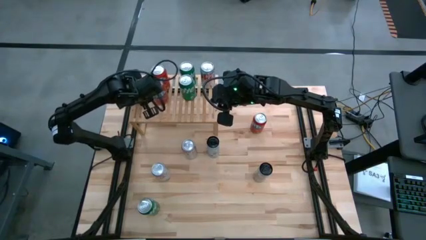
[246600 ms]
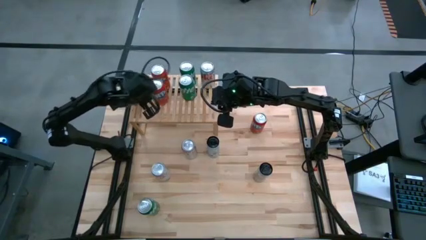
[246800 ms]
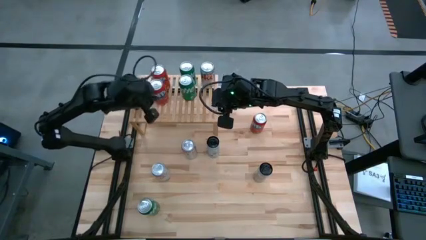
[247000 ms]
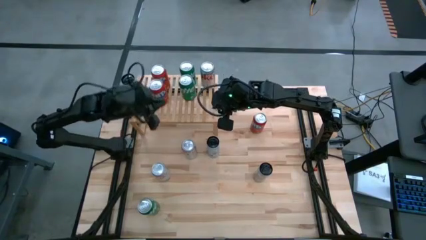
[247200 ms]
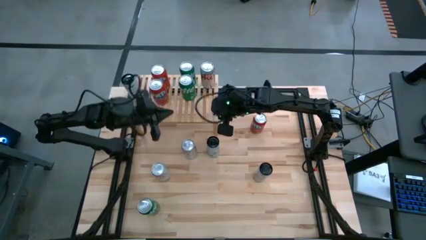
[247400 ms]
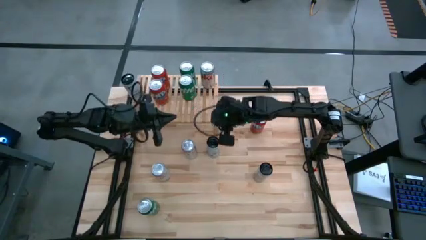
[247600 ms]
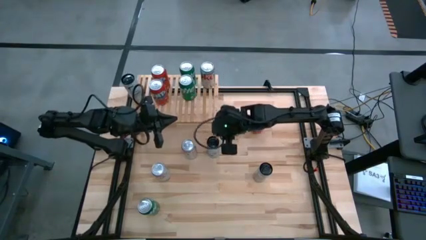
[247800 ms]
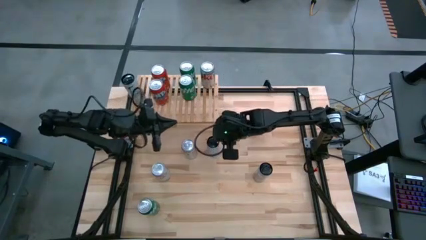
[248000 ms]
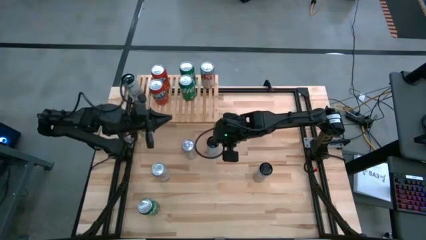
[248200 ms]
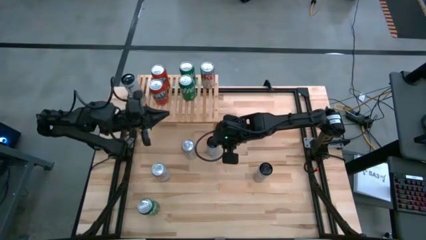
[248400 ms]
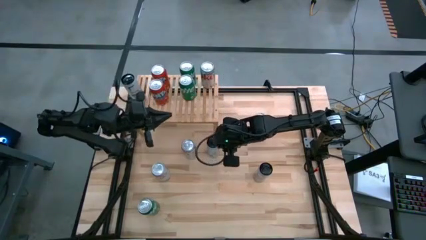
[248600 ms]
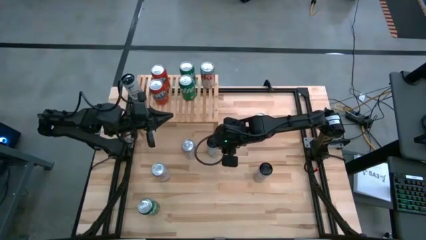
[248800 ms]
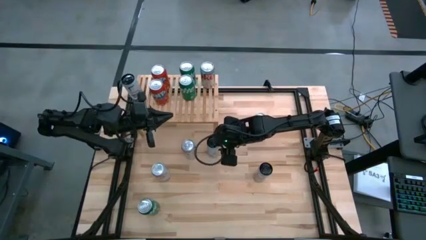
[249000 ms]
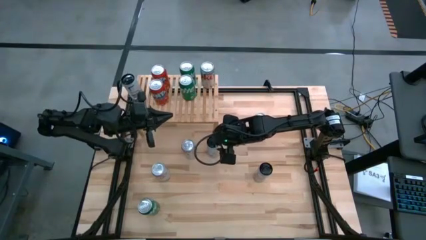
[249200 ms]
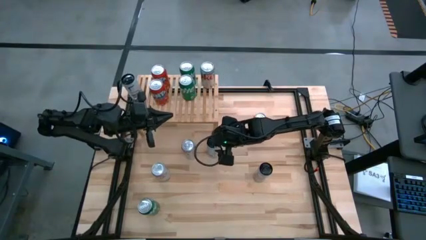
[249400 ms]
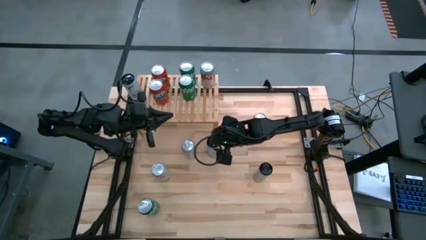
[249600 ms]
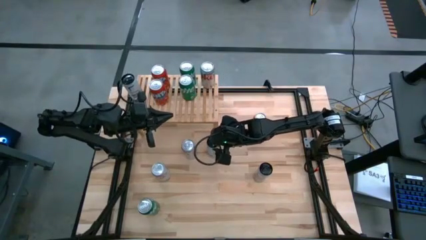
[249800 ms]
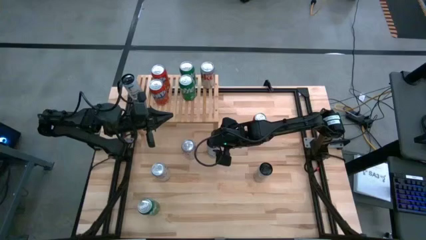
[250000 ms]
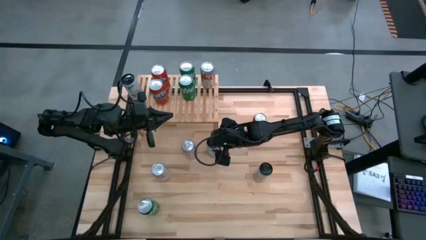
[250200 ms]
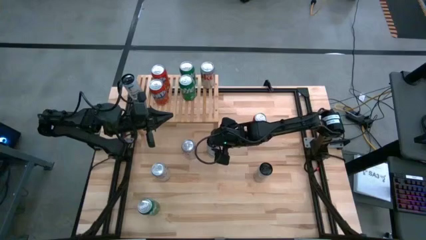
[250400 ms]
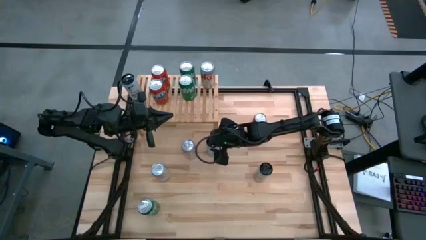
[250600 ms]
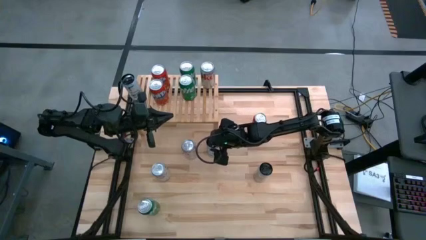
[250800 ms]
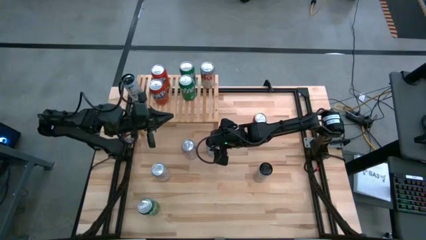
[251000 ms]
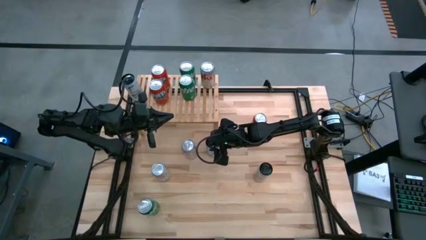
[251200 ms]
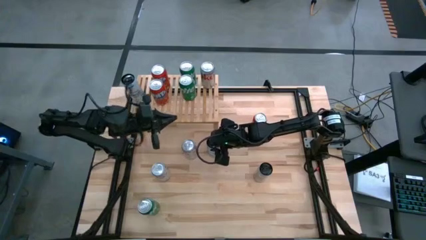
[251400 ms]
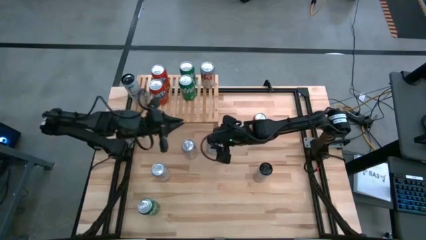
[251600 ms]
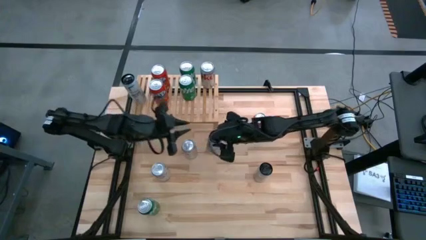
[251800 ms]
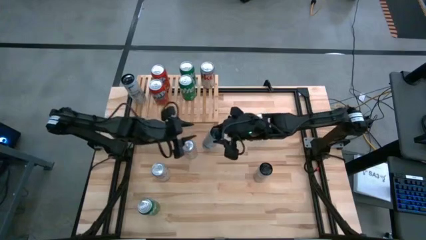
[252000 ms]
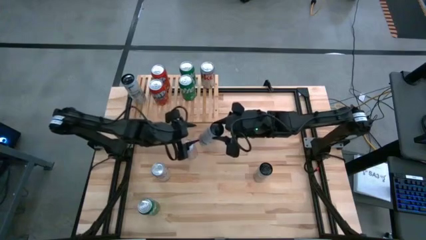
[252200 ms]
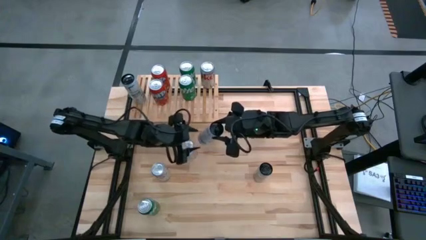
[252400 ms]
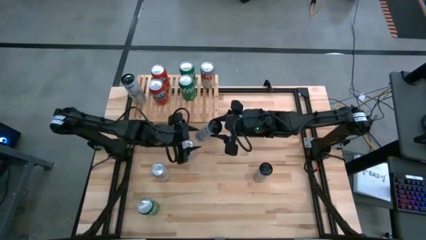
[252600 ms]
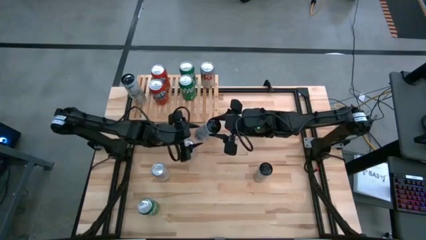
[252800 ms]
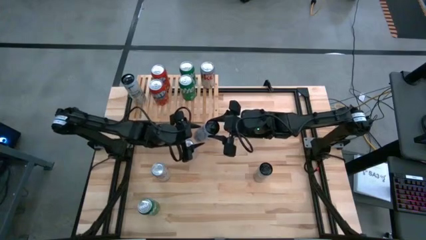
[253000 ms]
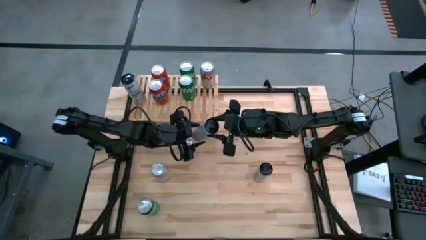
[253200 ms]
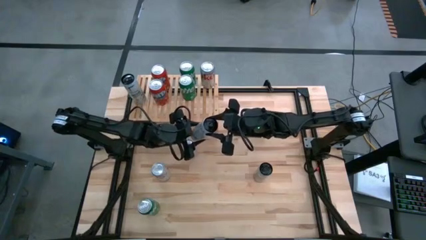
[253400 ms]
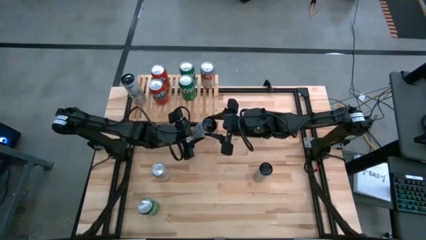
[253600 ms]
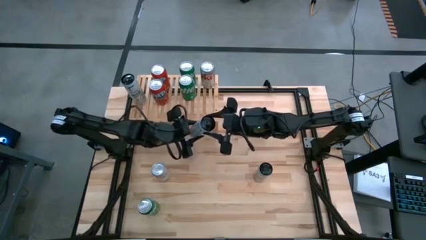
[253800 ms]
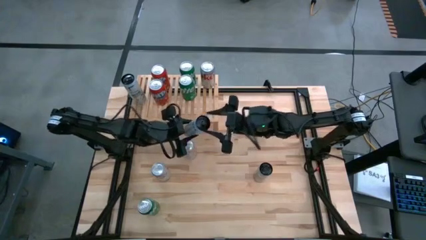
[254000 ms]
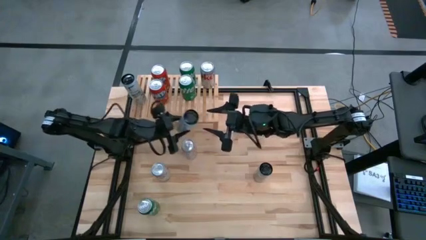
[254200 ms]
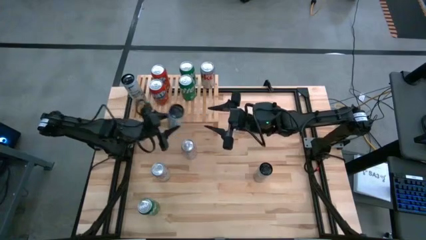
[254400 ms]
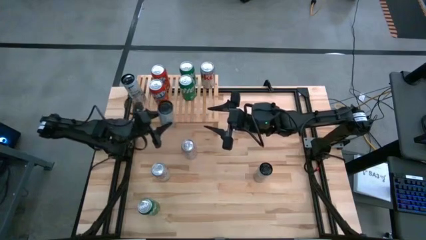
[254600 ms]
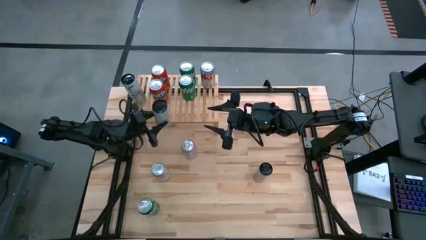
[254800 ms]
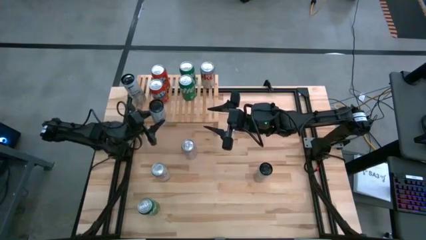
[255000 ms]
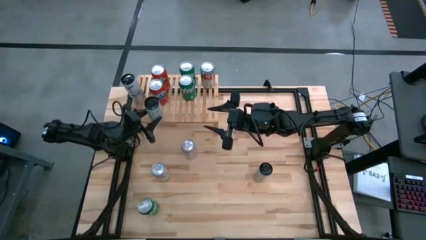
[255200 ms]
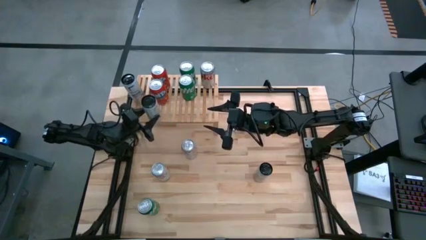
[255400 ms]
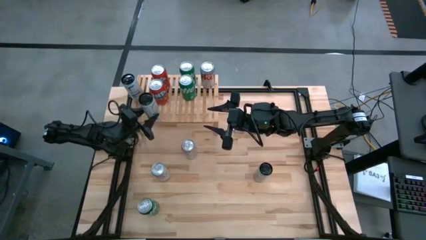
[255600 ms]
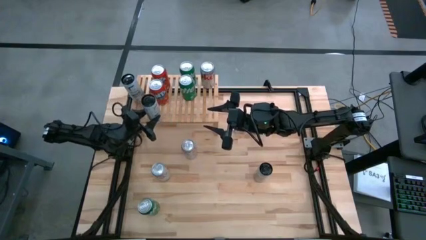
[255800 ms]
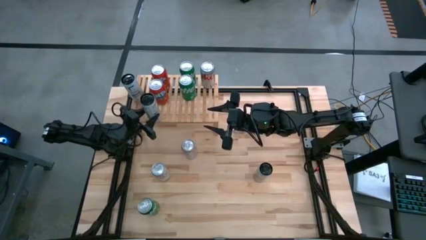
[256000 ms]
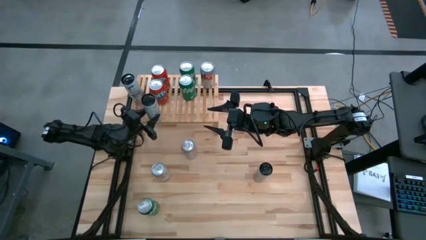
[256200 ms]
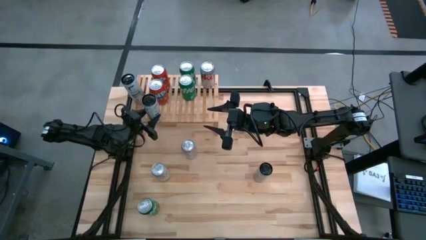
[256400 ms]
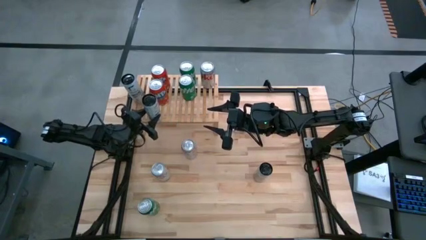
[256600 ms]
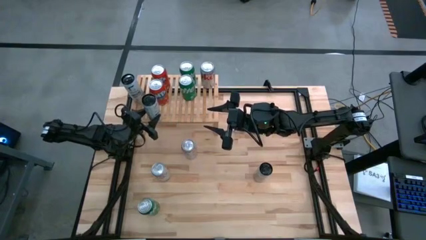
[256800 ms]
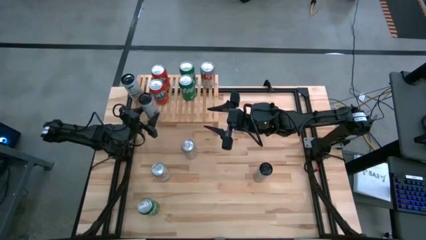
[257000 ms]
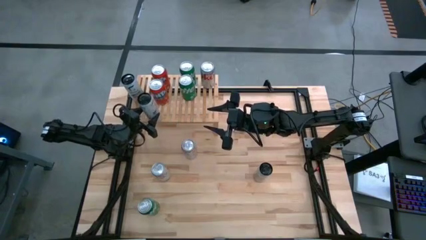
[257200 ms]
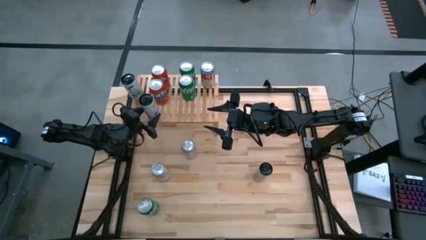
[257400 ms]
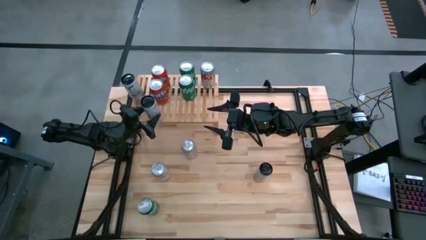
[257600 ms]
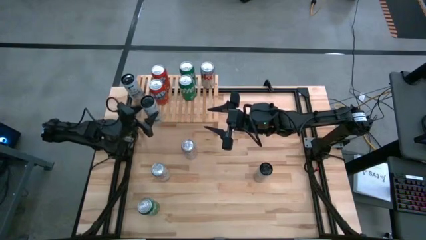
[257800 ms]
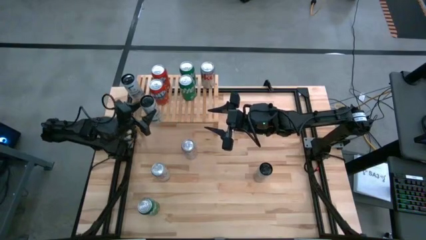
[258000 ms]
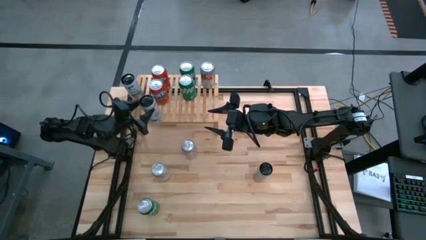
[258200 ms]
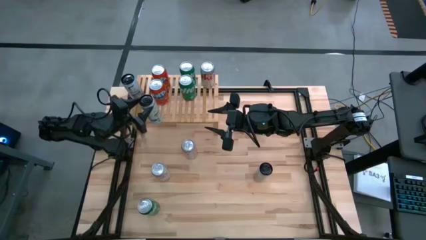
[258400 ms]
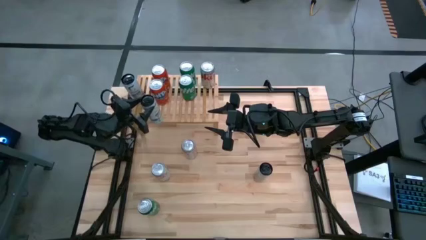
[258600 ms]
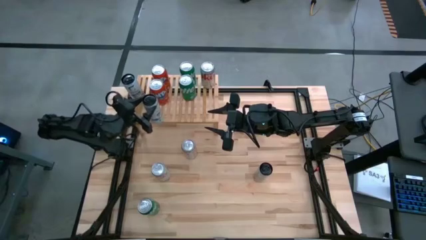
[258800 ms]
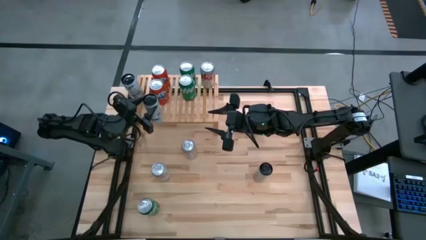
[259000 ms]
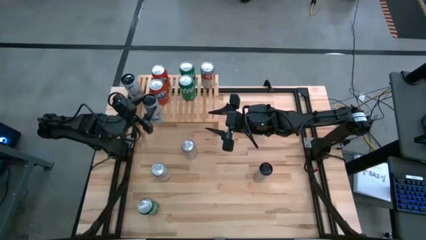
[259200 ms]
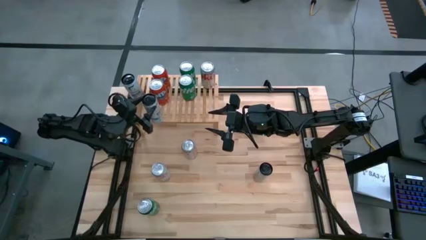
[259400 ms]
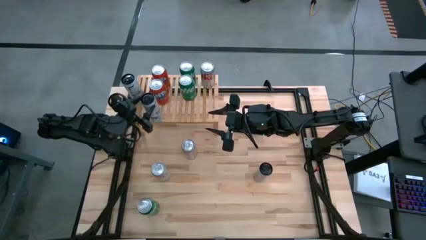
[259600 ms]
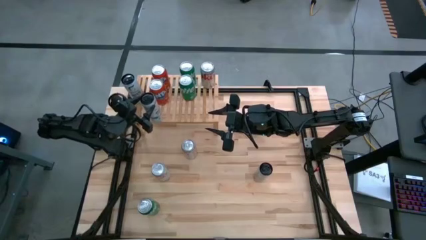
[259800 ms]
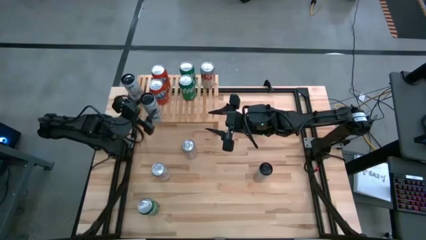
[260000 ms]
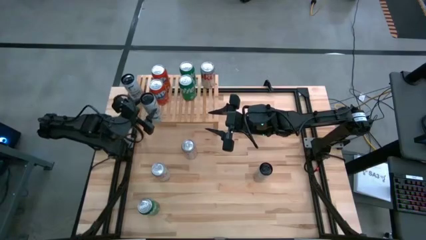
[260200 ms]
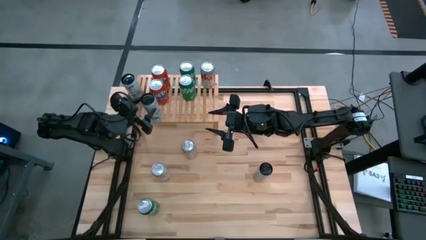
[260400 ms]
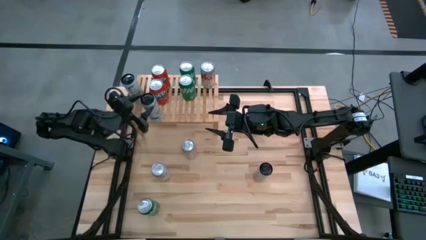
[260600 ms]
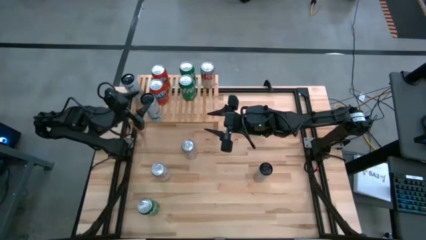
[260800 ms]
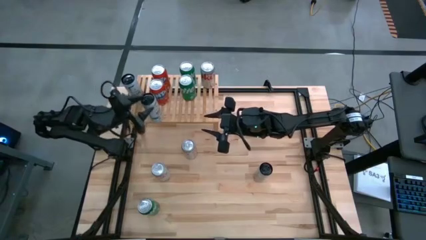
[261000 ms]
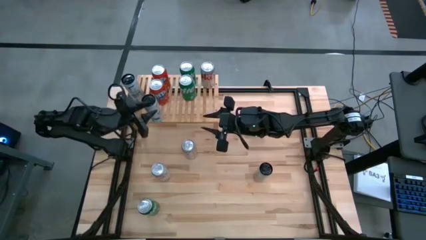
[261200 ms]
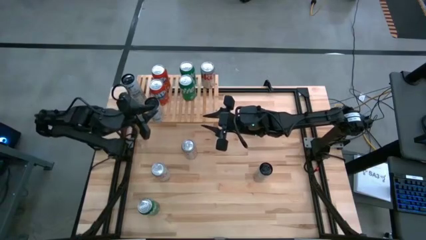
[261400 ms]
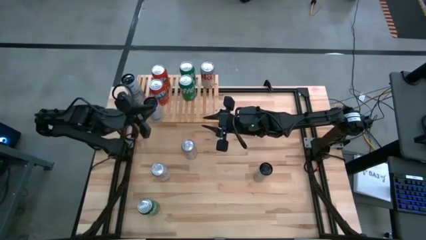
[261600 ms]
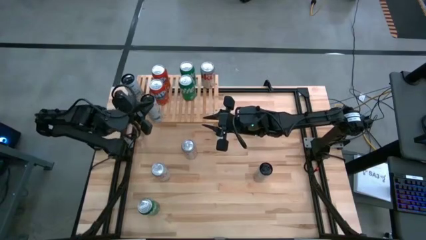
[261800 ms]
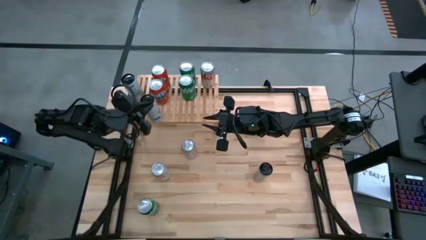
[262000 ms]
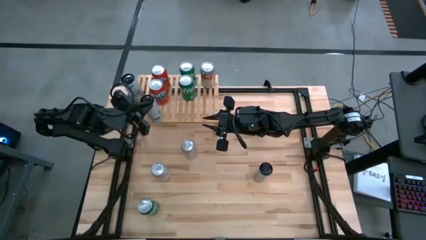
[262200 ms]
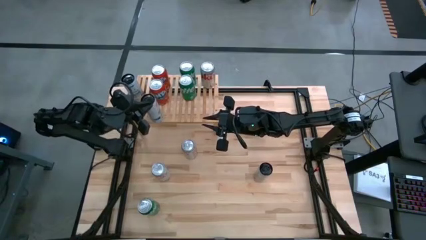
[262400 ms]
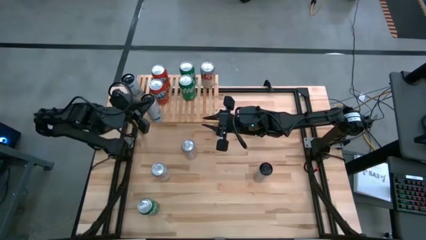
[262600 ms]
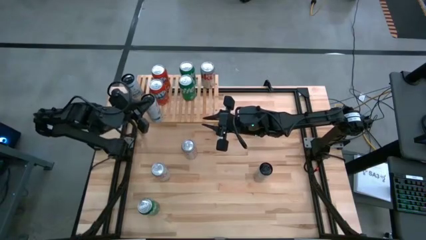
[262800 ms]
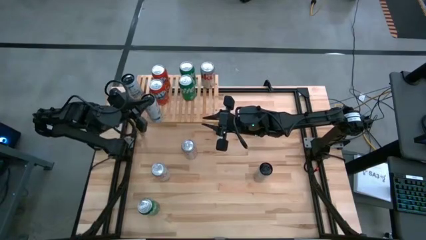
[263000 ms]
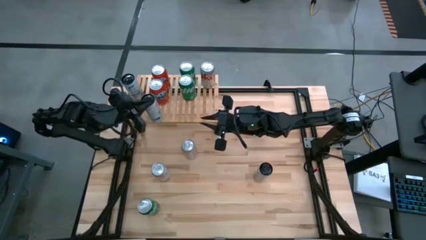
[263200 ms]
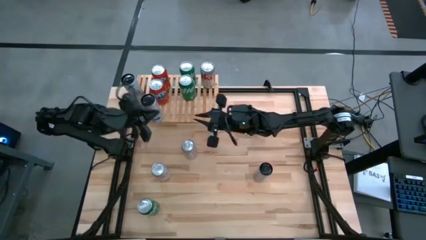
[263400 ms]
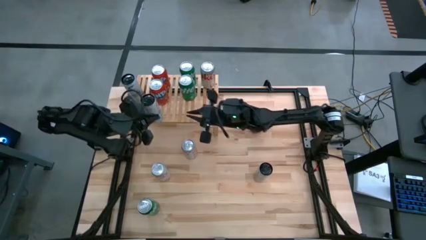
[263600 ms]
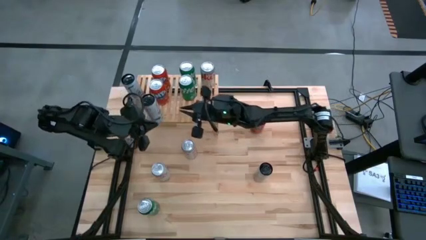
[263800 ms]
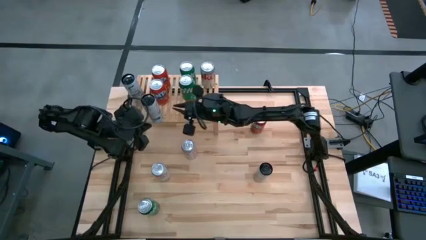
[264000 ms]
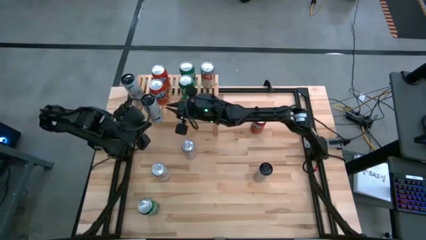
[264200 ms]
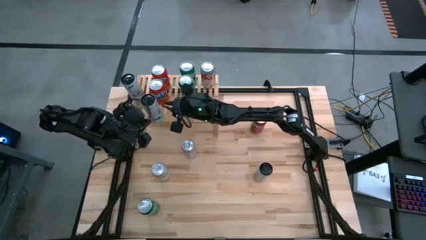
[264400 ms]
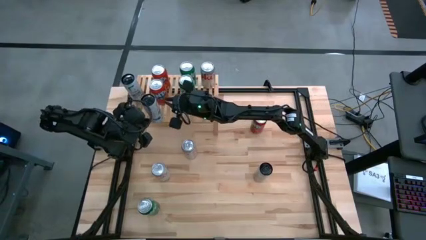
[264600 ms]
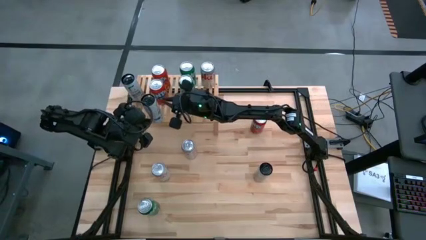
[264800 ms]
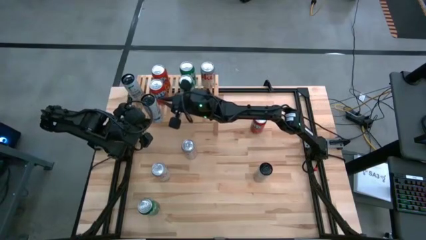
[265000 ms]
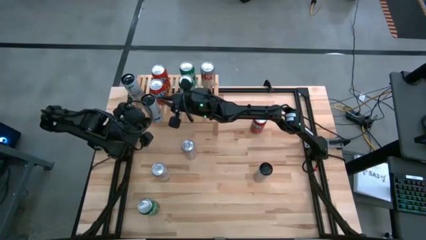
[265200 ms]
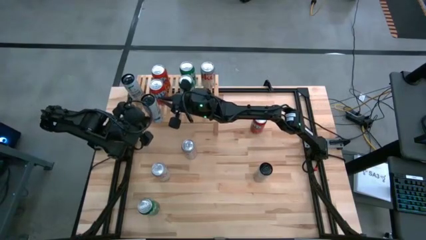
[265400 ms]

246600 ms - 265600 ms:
Task: Place canned beverage on shelf
Put the top white/blue soda can on the shelf aligned with the other white/blue soda can
